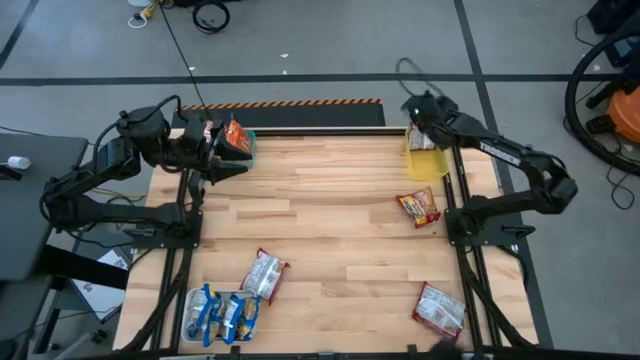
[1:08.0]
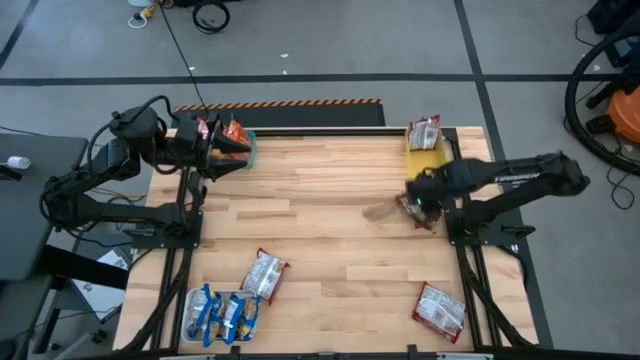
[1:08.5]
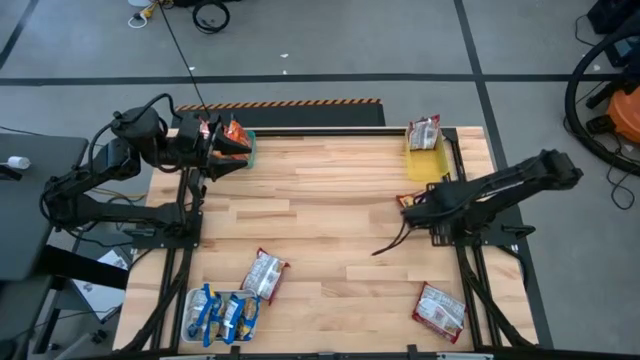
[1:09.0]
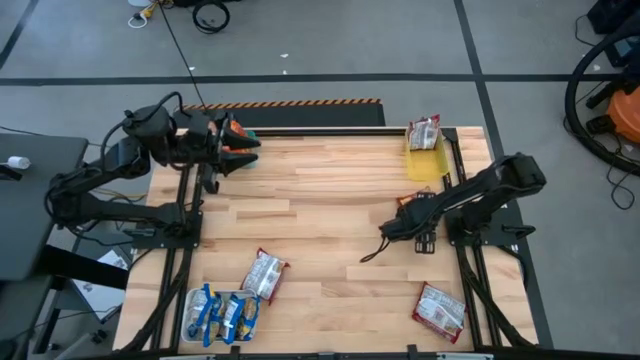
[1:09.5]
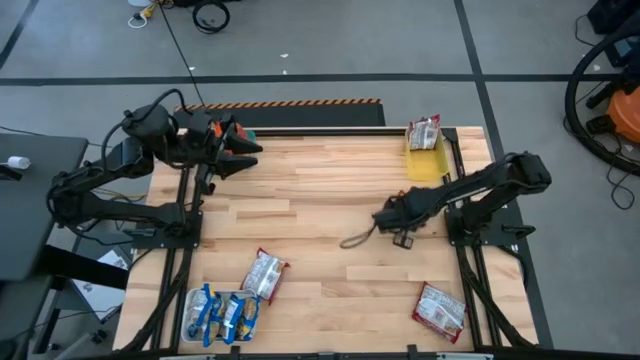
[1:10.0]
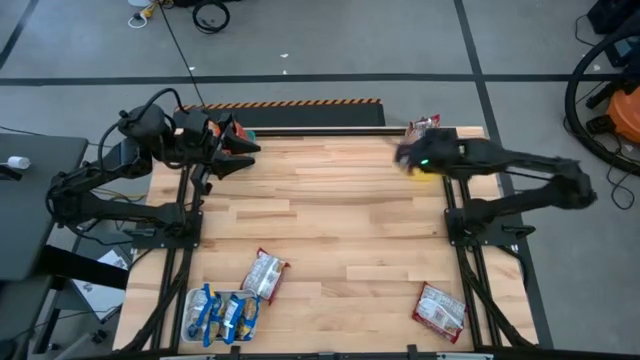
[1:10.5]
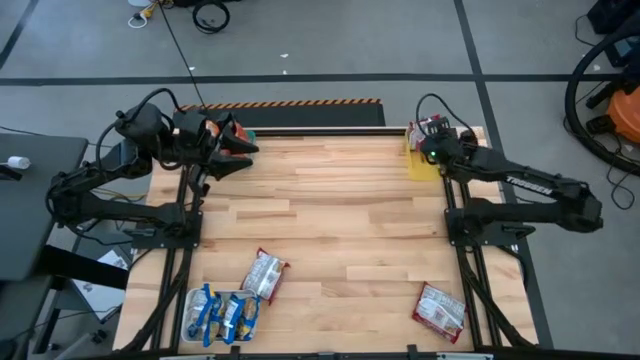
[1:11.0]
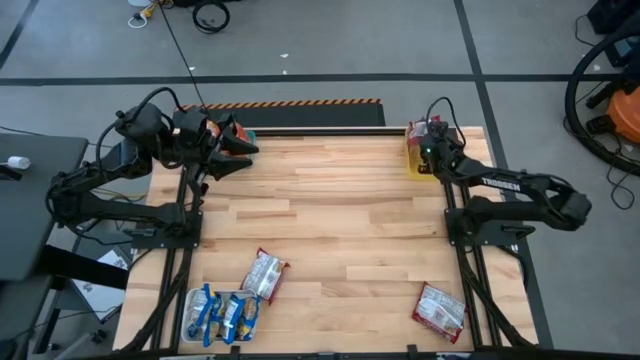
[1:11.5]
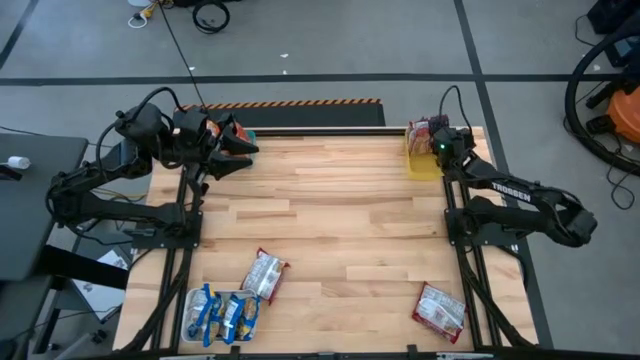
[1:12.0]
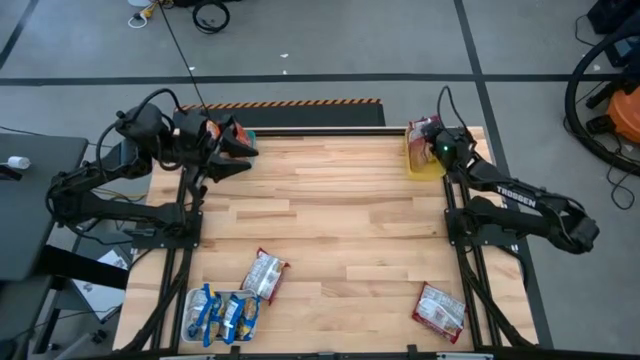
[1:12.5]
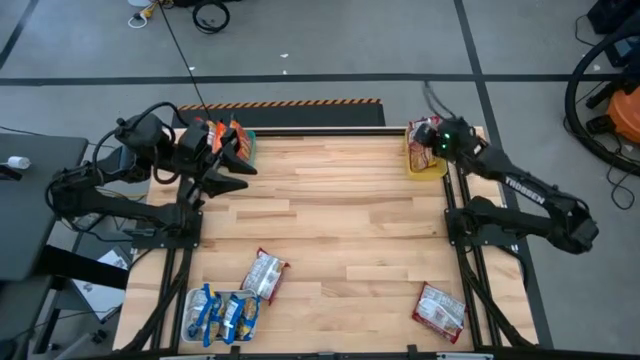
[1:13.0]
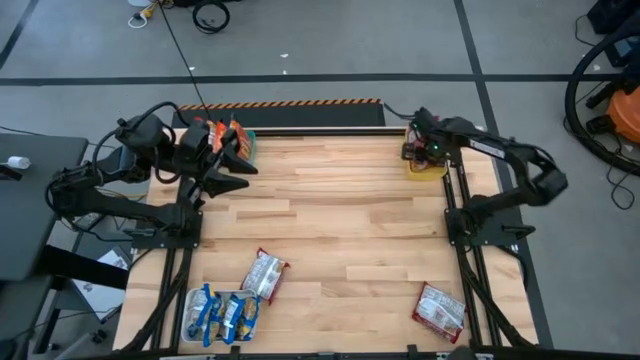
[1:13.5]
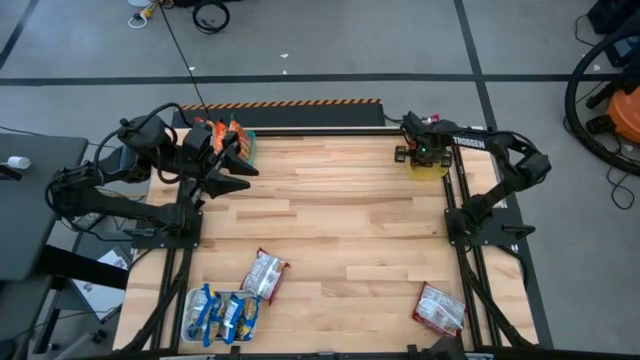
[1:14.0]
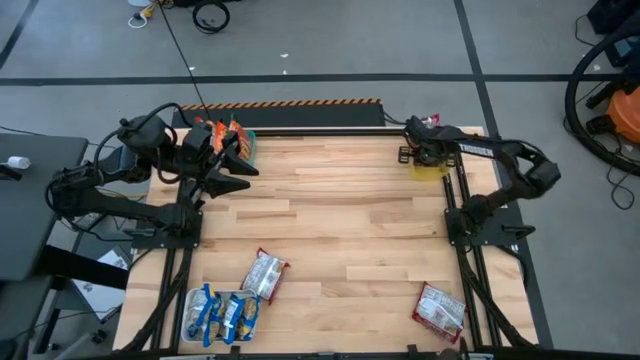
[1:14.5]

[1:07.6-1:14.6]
Task: Sort Maruchan noodles
Put the red noodle pack into the yellow bin

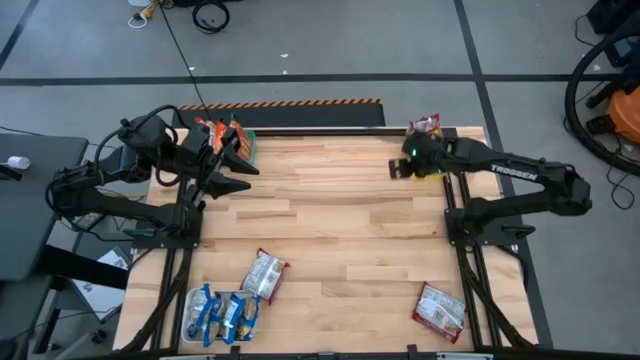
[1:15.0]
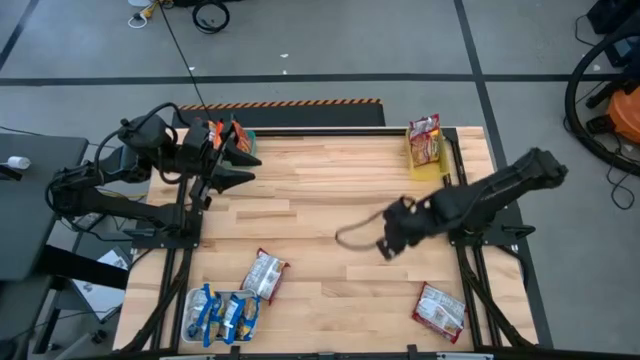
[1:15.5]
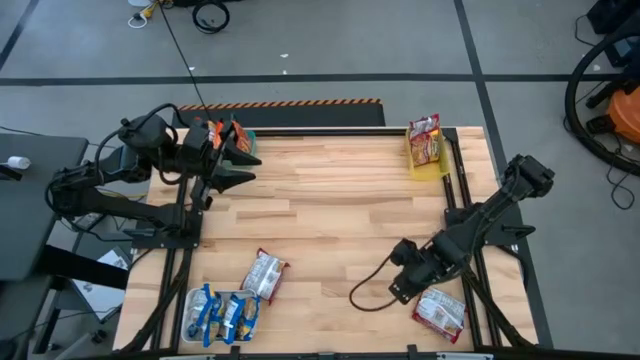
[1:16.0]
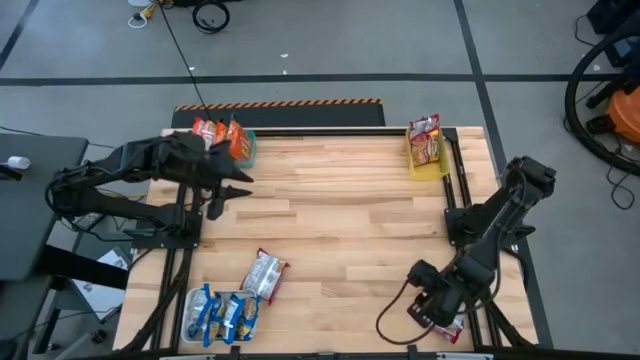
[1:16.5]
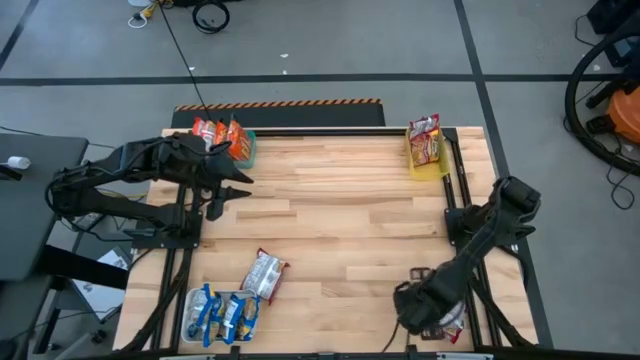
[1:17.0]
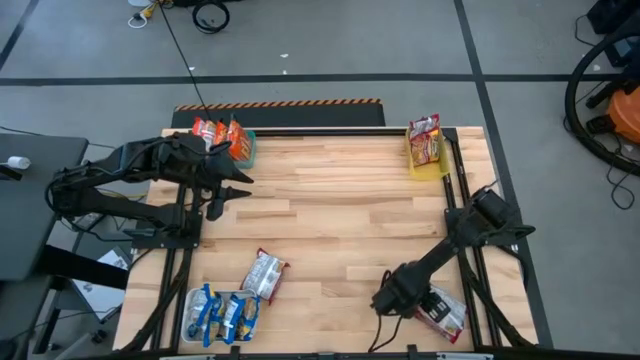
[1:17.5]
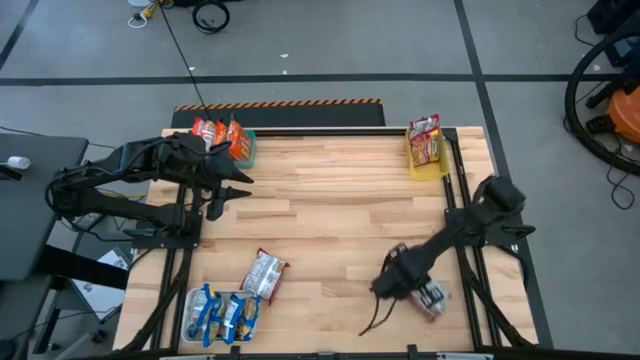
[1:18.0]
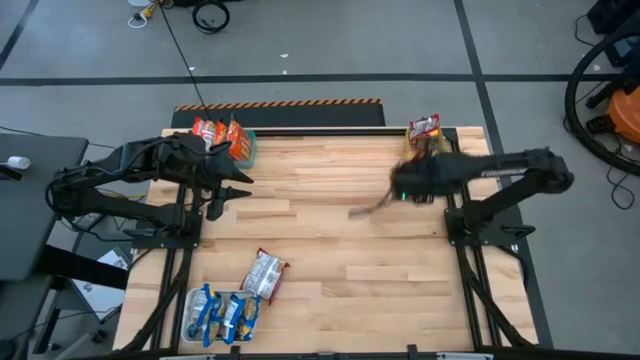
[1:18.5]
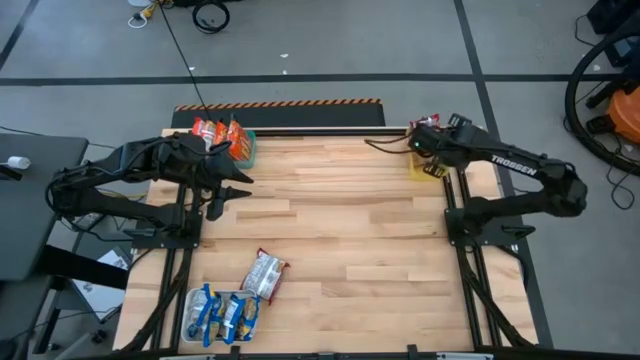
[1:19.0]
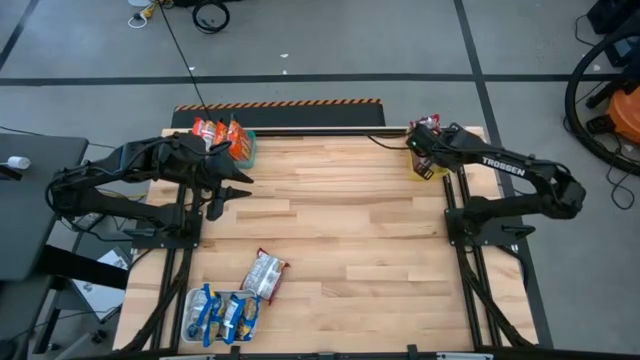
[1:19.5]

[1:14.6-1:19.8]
Put the red noodle pack into the yellow bin

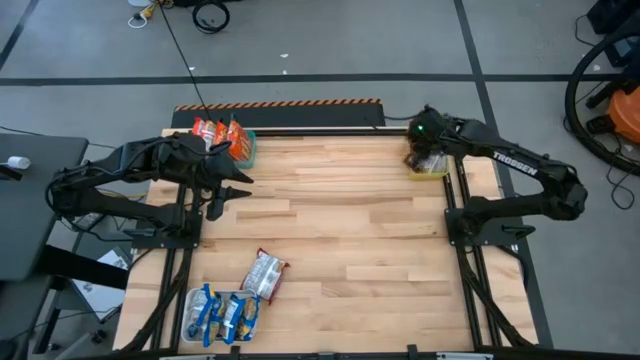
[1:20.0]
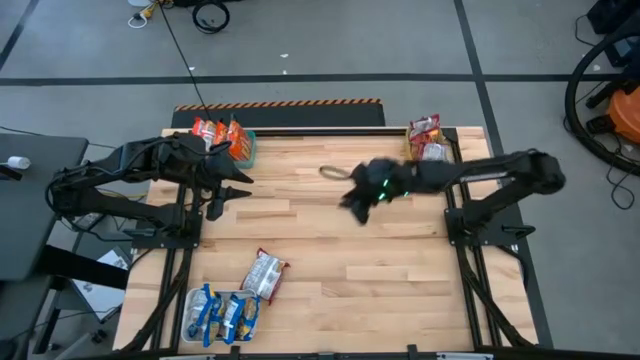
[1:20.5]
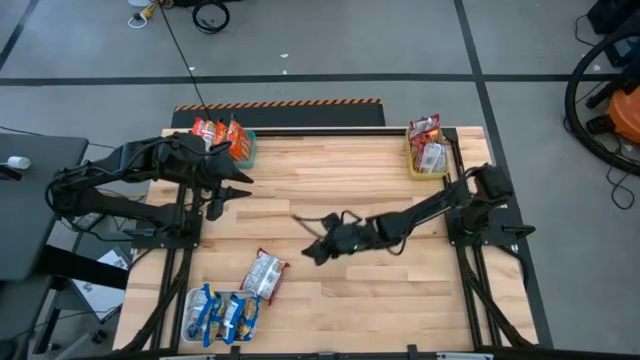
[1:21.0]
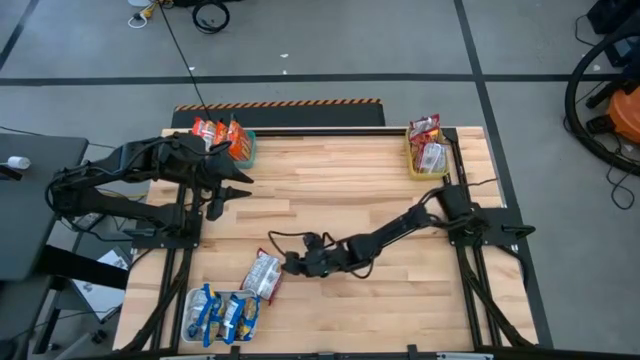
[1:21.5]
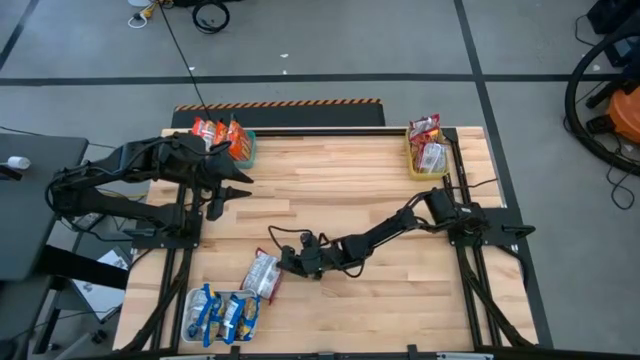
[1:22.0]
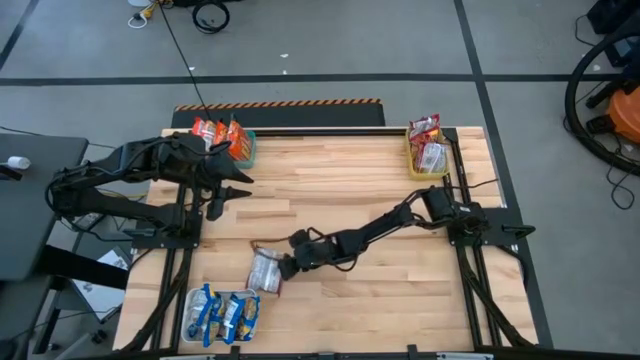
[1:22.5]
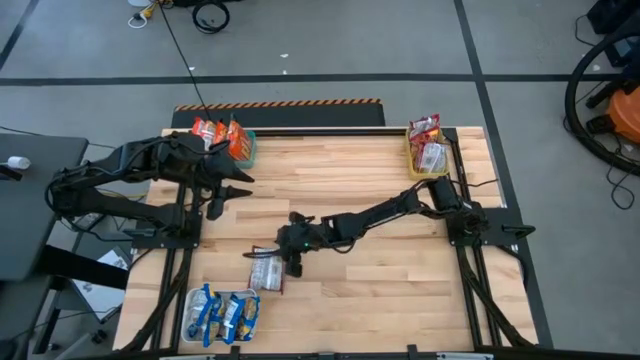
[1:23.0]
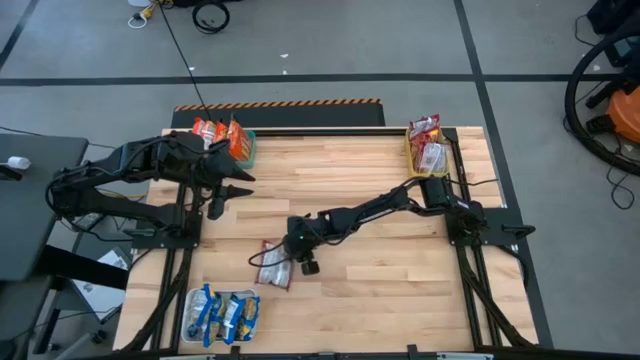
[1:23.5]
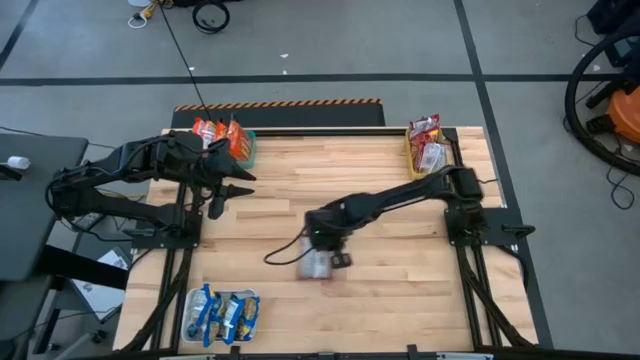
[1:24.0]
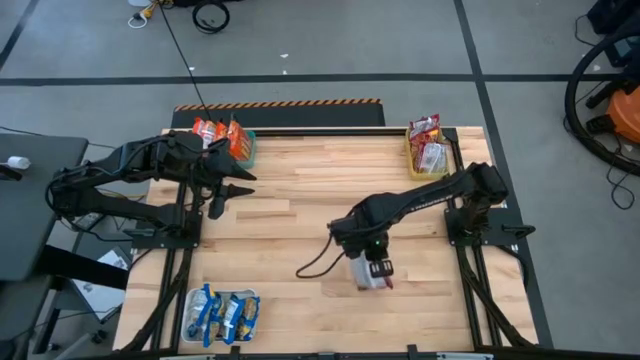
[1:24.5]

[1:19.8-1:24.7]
Put the red noodle pack into the yellow bin

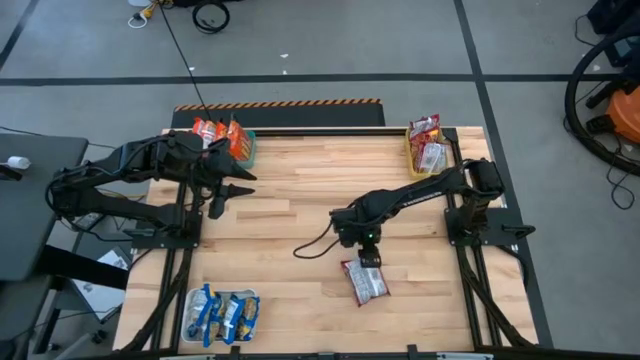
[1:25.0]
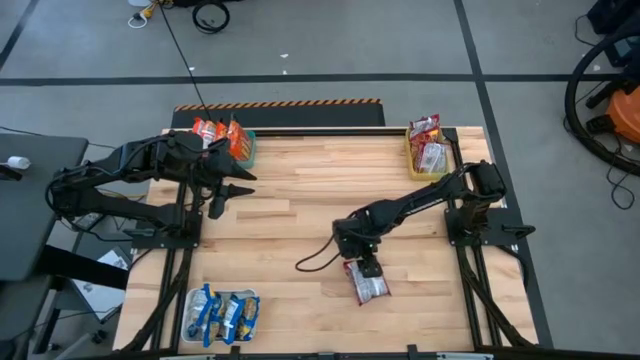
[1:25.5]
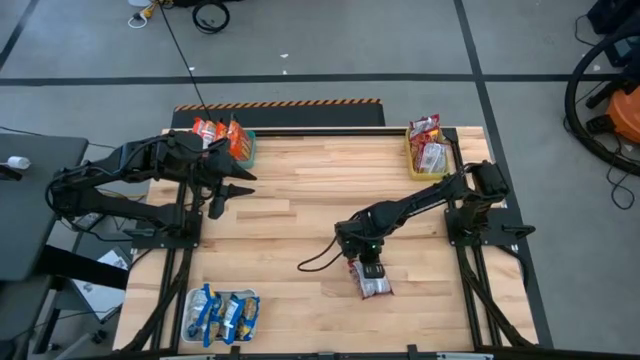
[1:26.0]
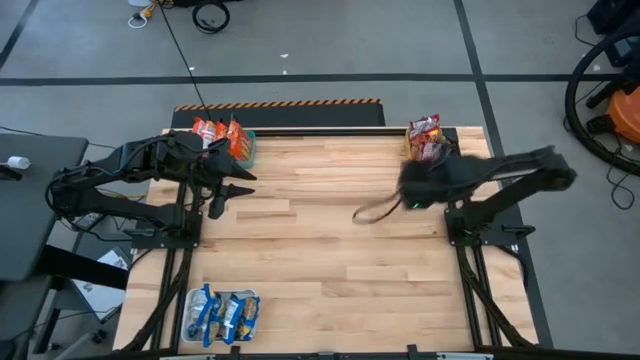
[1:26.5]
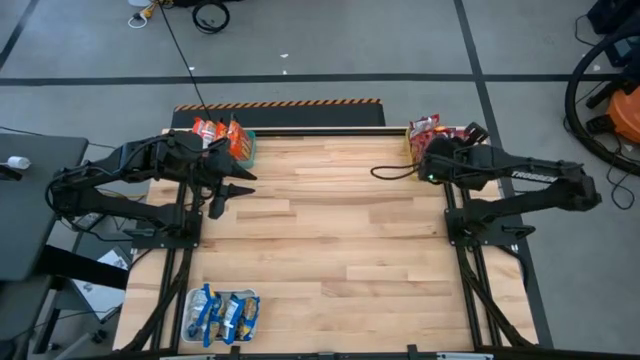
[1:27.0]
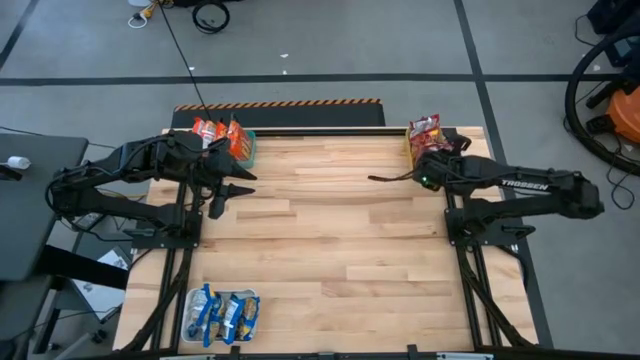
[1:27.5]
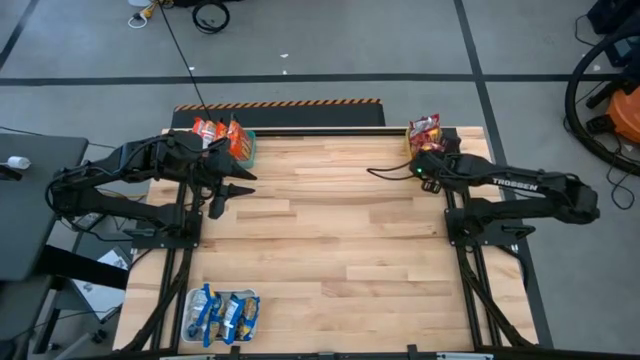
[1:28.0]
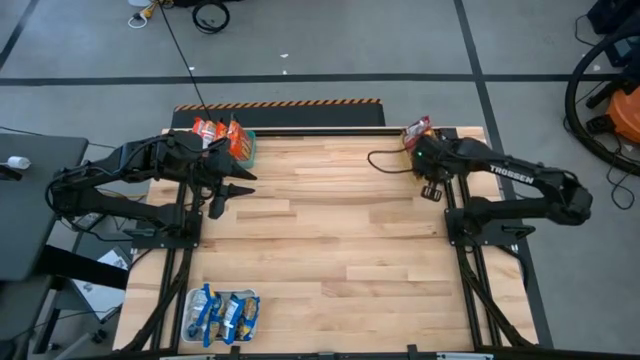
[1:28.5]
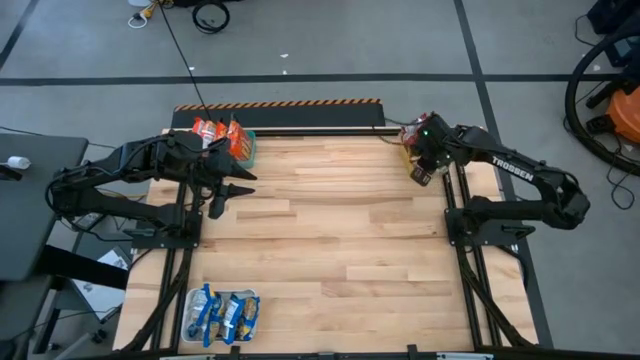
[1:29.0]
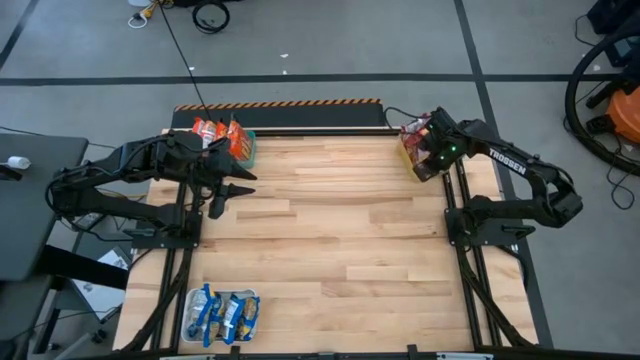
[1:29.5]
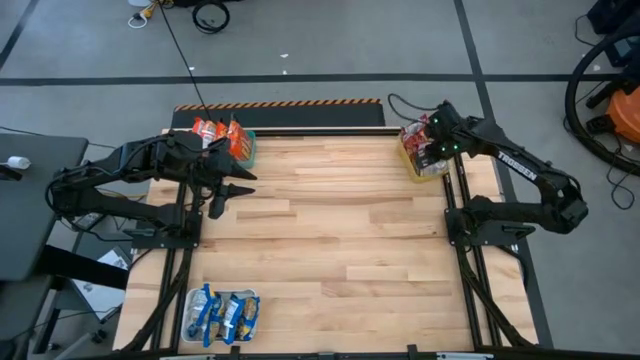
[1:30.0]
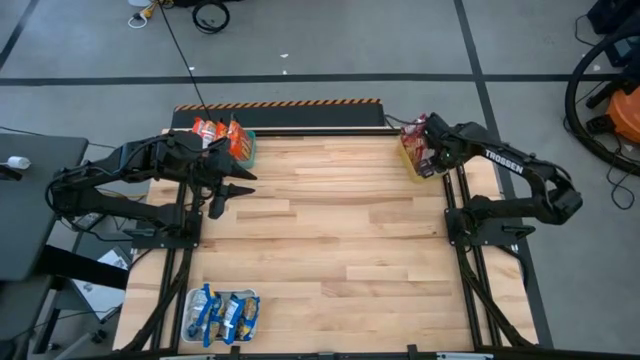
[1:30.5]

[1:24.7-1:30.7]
Put the red noodle pack into the yellow bin
